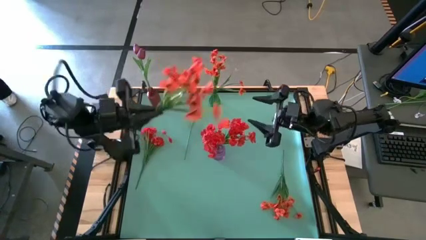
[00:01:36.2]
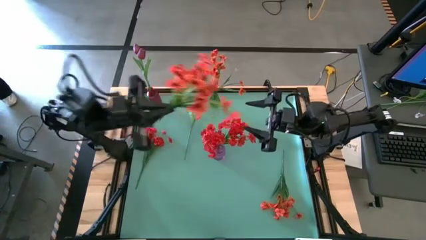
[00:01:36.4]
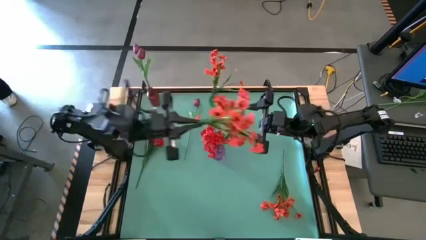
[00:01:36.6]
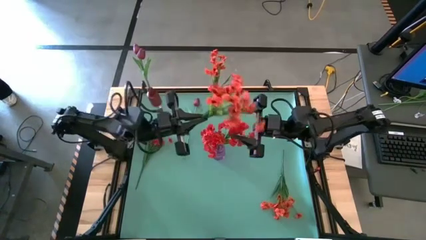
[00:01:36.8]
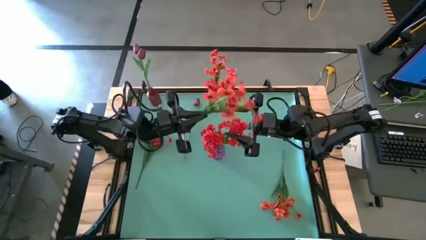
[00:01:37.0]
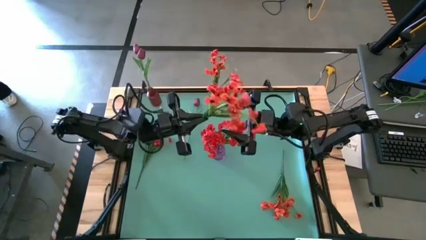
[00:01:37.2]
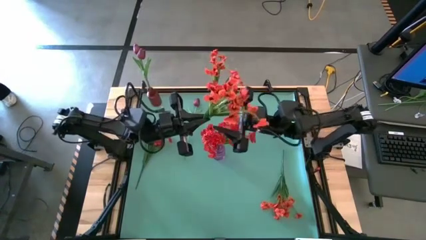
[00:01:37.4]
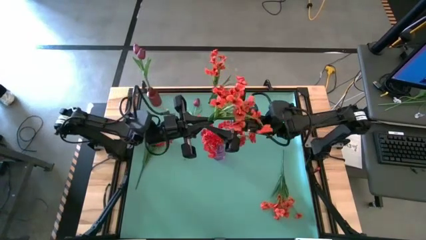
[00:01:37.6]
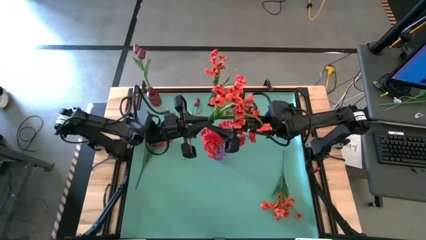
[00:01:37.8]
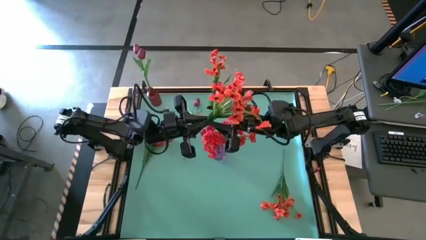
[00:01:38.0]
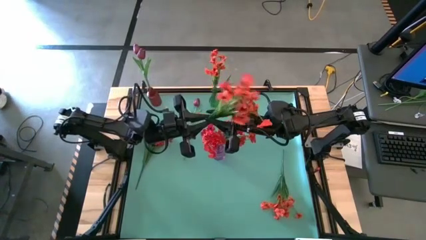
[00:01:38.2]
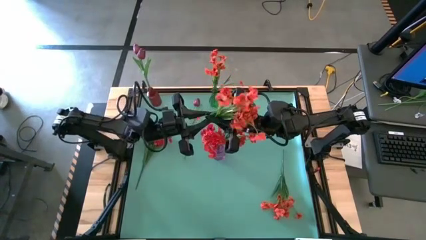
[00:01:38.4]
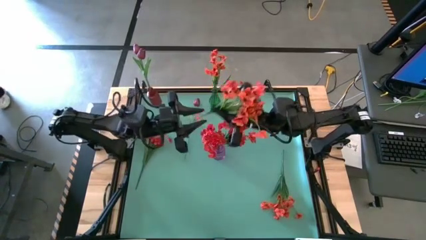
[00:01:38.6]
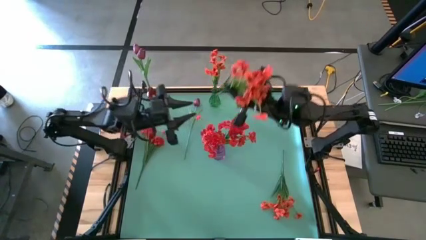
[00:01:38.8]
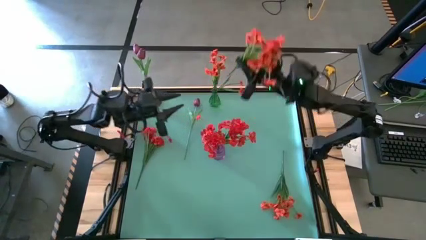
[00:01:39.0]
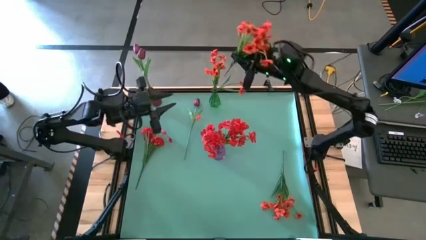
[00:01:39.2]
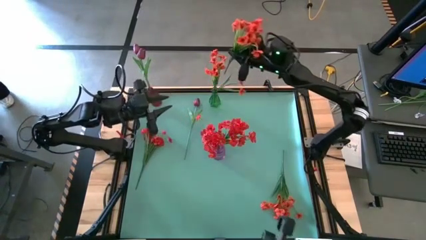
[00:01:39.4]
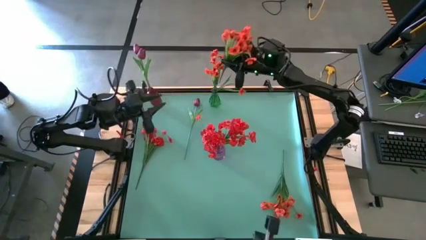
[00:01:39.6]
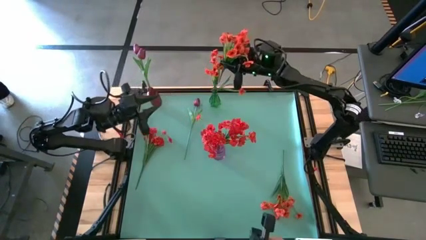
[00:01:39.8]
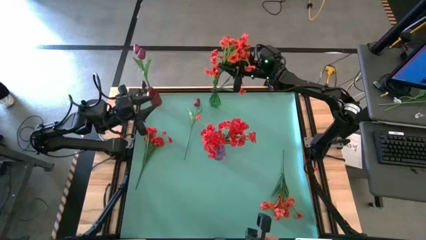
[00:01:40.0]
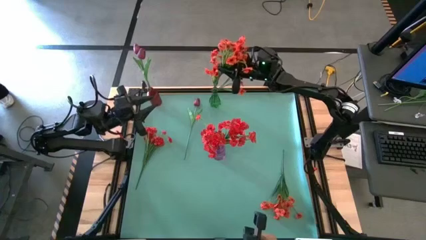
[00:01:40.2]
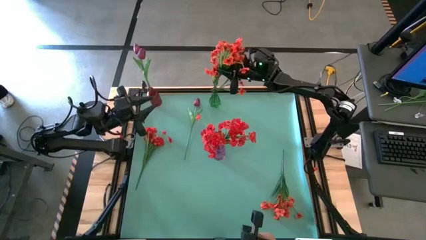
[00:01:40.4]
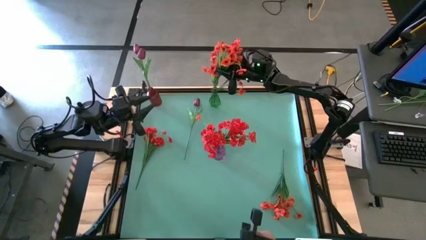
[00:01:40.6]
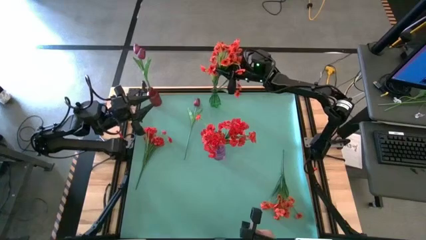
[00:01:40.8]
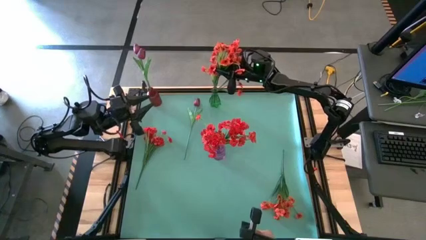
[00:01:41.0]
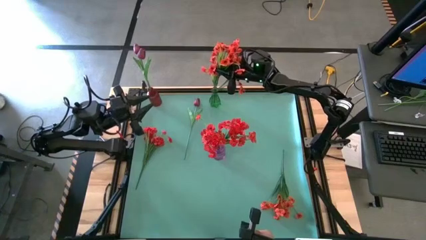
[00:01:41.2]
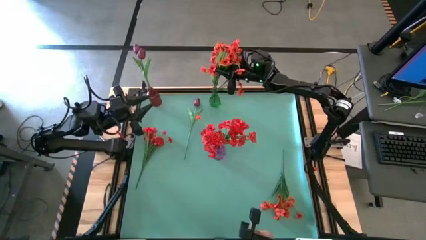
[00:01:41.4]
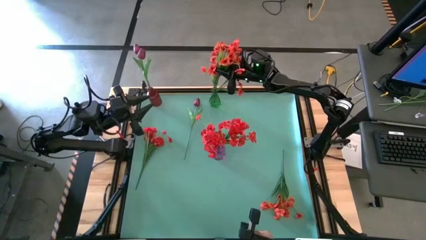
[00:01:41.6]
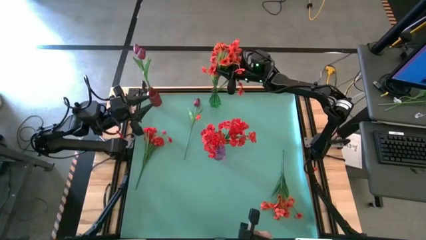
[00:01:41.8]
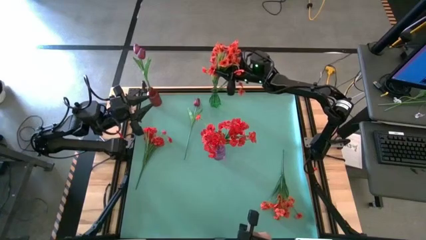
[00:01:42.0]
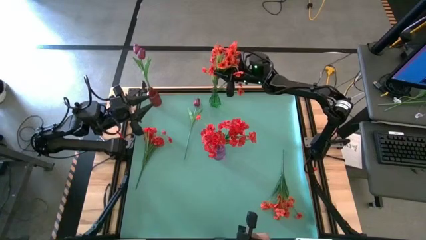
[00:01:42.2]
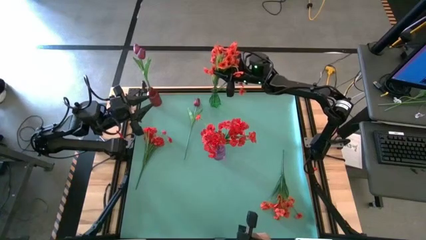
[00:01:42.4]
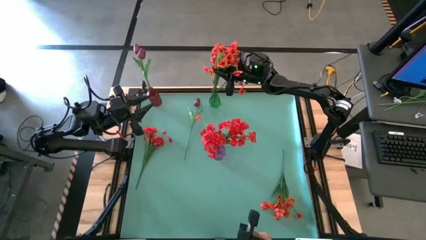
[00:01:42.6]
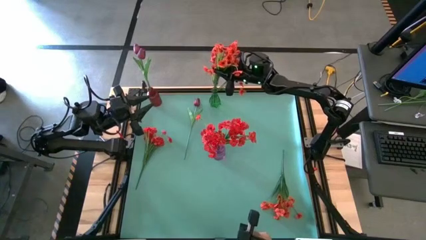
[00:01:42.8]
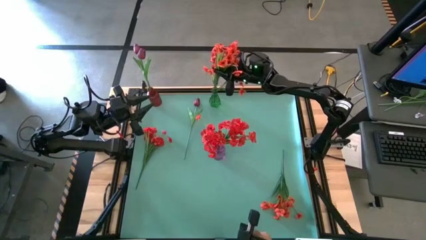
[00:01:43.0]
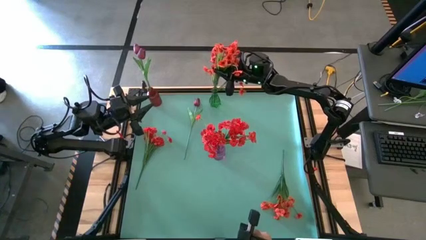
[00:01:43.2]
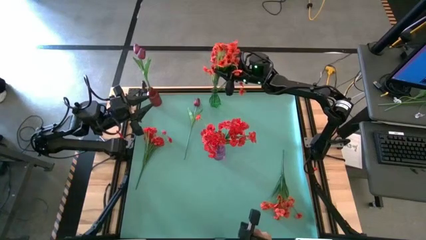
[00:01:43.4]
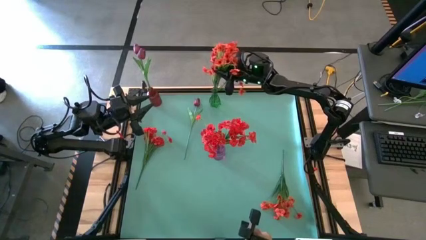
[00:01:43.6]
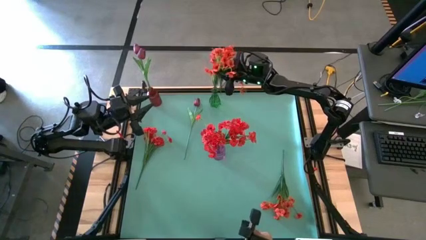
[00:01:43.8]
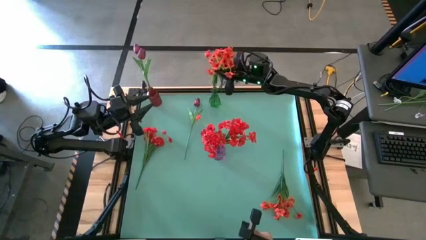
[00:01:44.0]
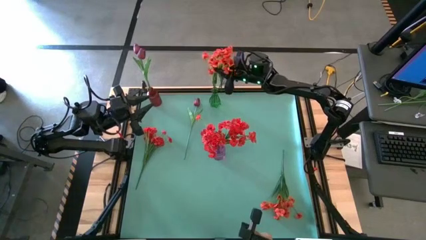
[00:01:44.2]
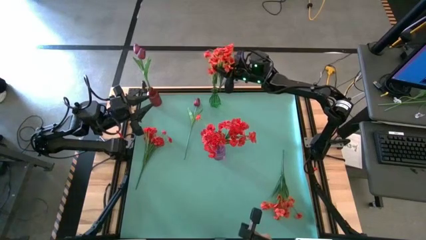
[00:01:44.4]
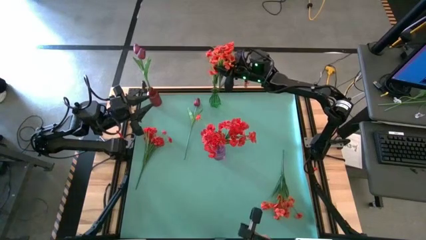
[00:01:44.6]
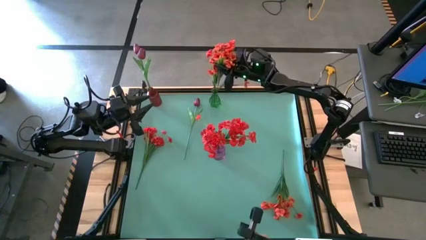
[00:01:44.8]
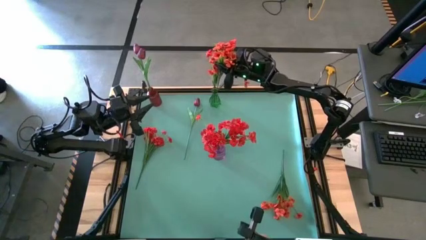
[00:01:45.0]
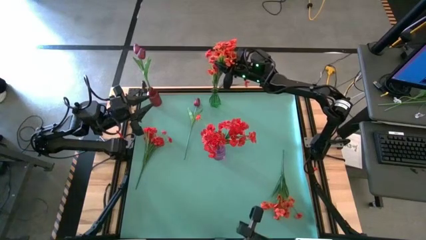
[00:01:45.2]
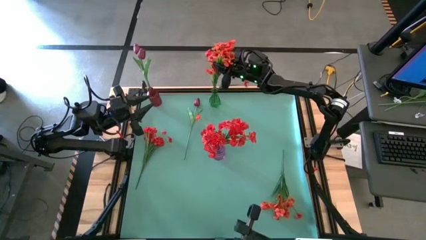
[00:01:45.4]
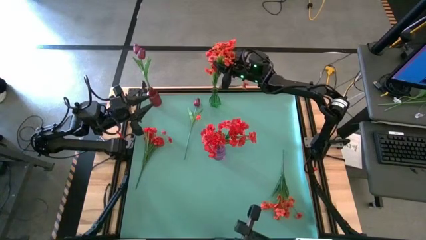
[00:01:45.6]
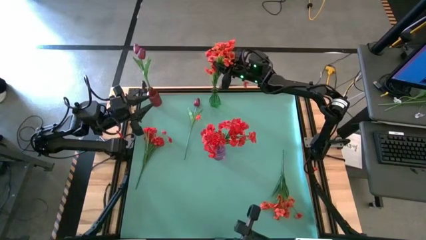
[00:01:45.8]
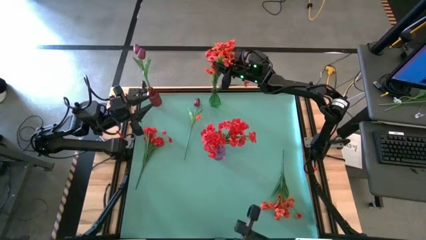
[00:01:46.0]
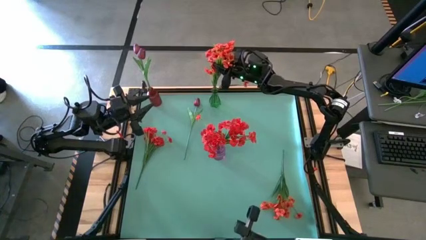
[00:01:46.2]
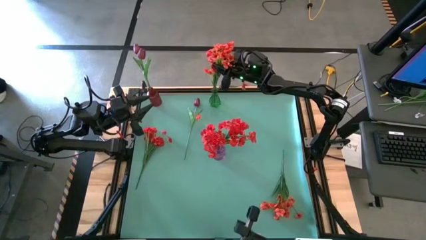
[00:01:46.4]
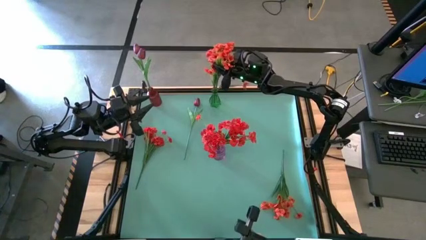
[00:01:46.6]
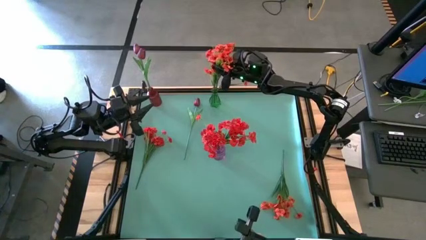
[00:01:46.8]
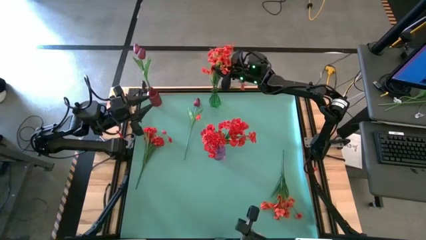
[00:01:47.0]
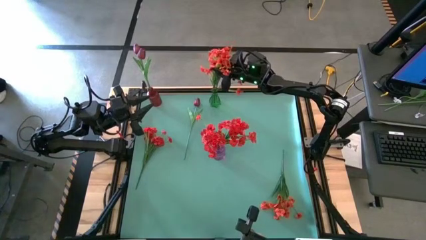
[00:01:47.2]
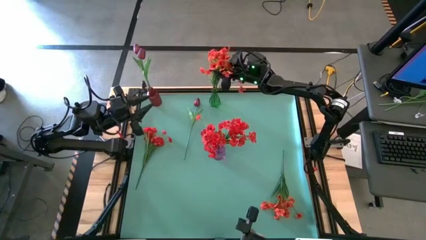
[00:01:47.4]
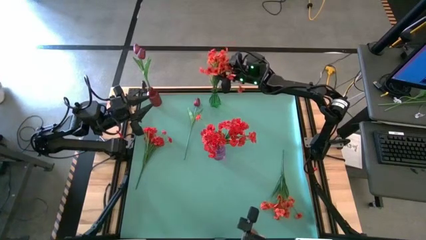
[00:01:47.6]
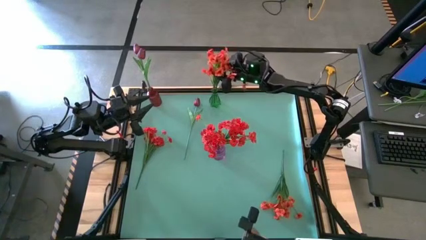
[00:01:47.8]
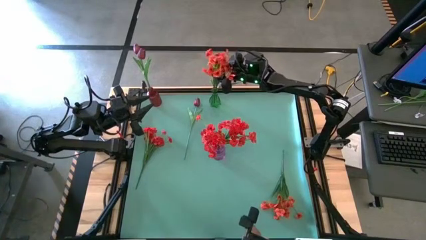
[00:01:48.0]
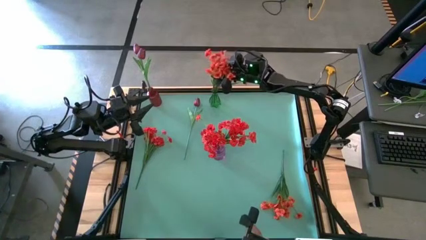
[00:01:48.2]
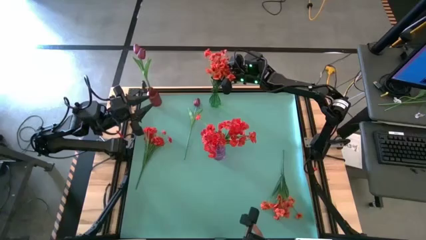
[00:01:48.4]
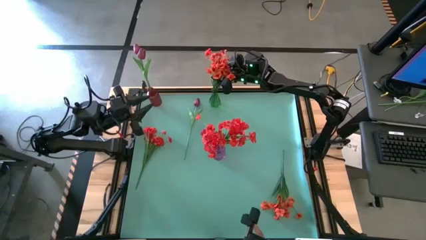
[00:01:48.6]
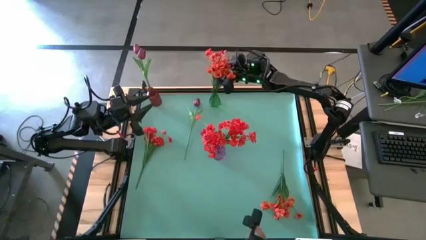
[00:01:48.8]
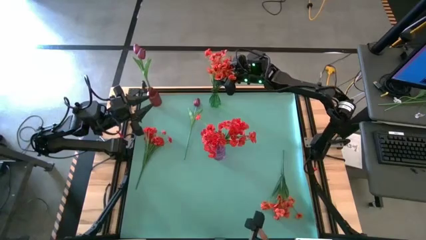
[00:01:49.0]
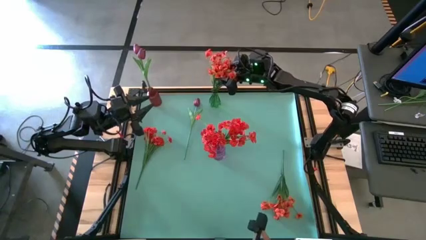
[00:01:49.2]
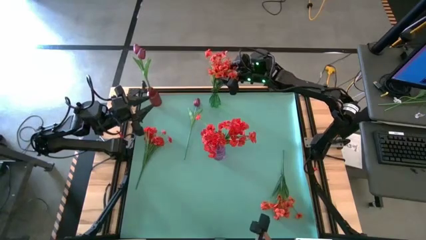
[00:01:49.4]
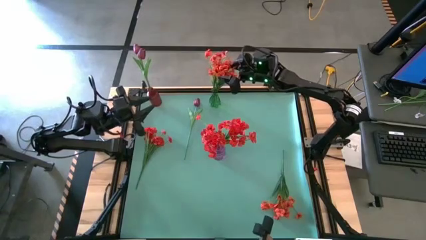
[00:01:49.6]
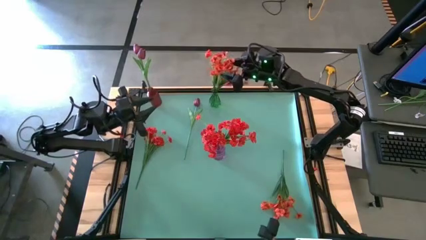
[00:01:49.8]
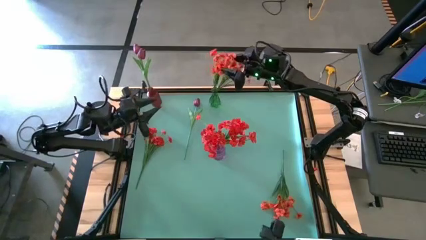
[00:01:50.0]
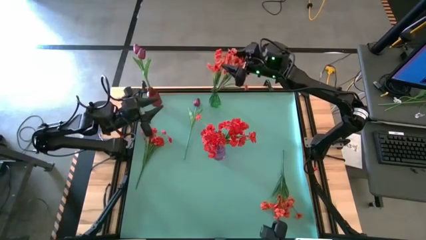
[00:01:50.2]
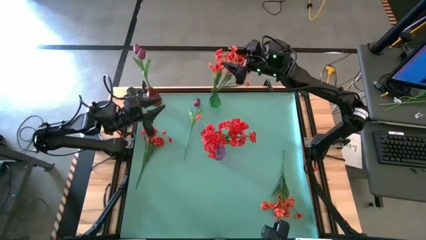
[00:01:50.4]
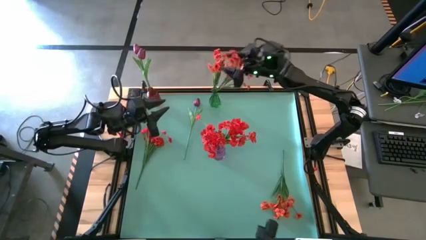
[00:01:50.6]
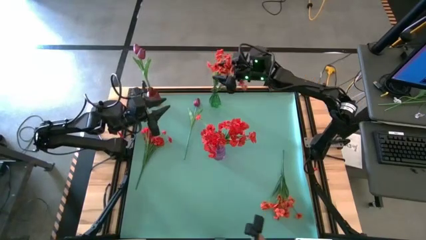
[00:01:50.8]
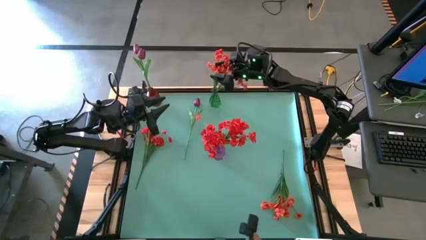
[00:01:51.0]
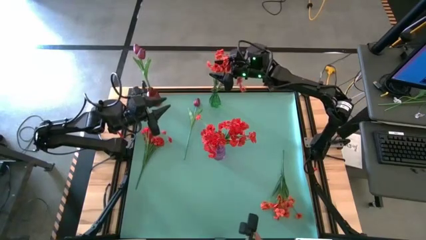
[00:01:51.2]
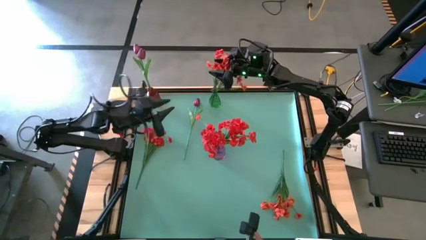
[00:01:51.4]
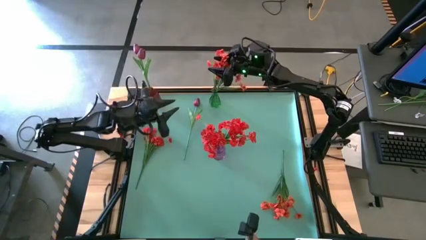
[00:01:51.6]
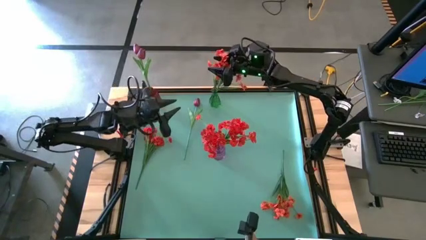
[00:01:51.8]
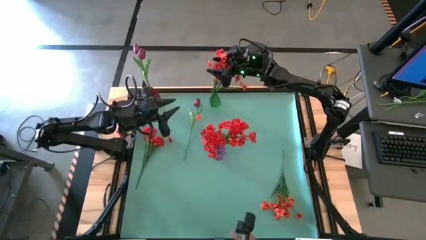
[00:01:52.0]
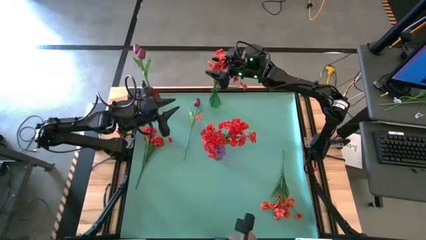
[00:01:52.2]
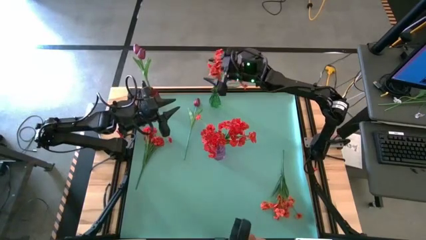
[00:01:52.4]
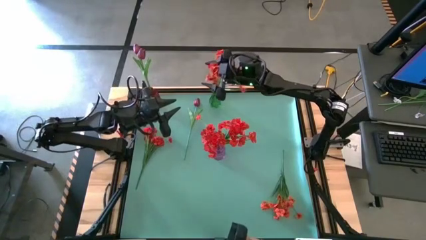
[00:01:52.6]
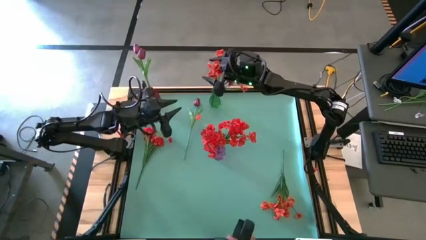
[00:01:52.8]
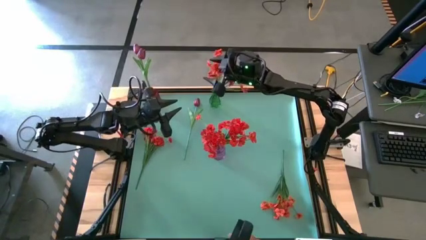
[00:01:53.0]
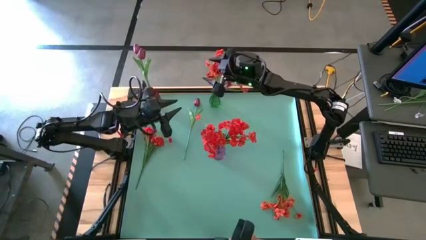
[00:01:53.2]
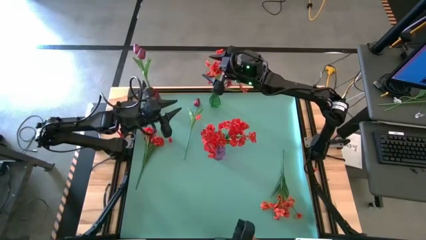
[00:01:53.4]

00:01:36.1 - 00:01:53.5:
Task: Sort flowers into vase by color
Put the orange flowers into the green vase
